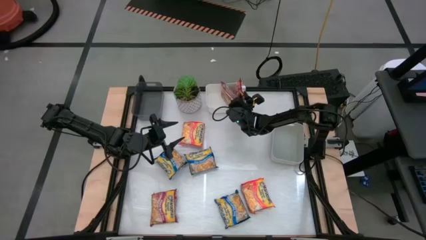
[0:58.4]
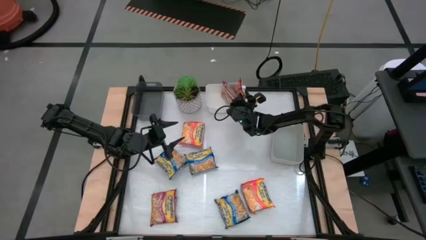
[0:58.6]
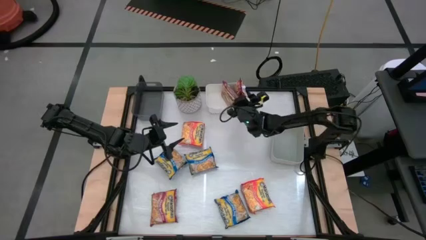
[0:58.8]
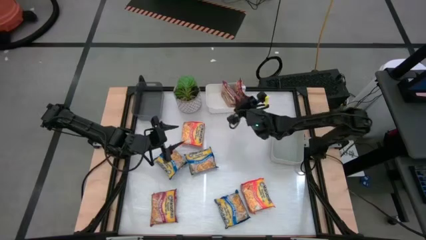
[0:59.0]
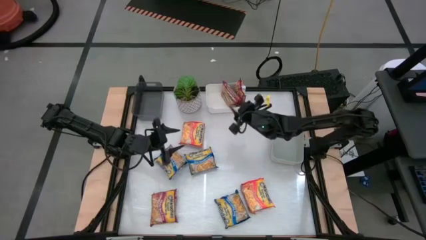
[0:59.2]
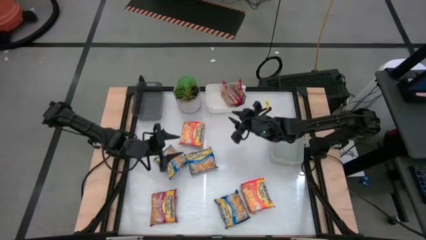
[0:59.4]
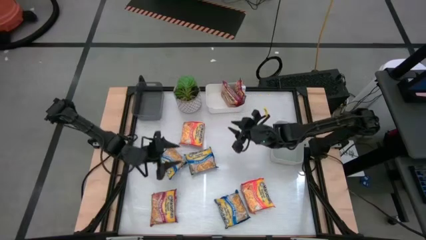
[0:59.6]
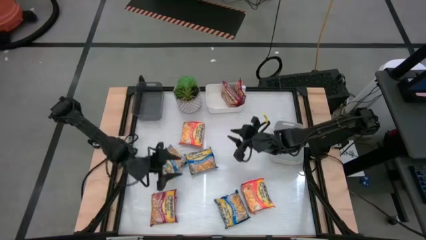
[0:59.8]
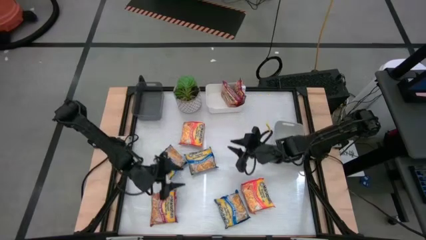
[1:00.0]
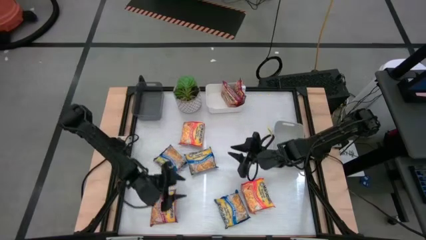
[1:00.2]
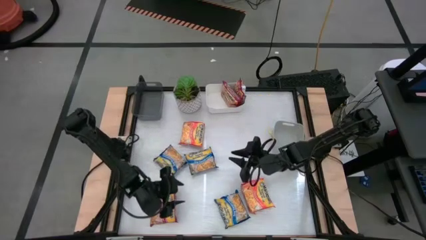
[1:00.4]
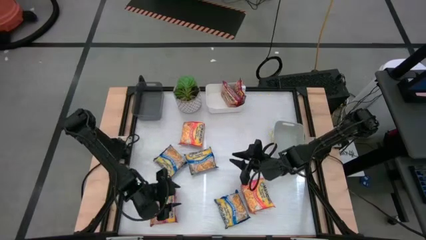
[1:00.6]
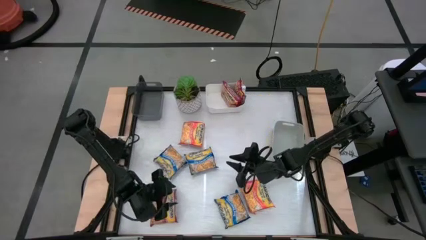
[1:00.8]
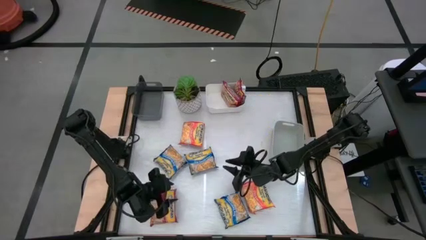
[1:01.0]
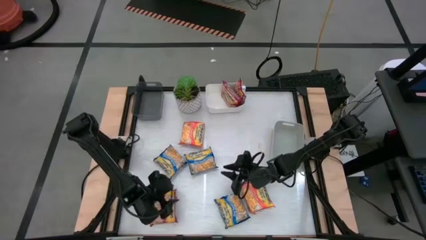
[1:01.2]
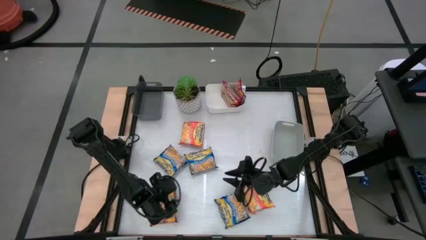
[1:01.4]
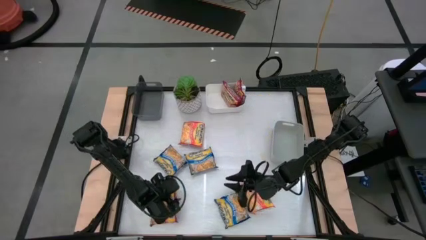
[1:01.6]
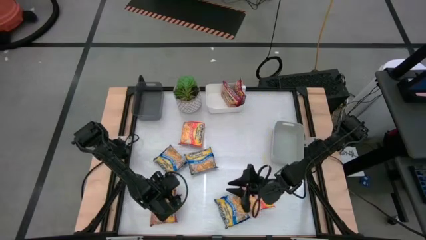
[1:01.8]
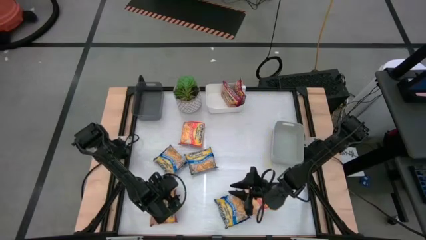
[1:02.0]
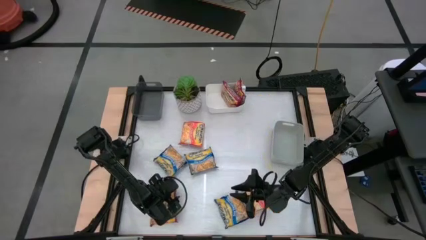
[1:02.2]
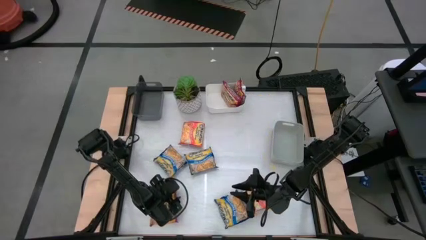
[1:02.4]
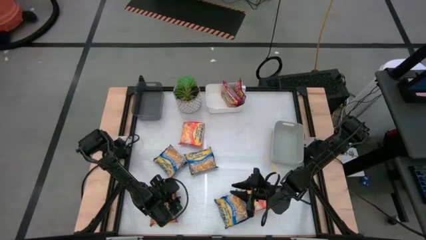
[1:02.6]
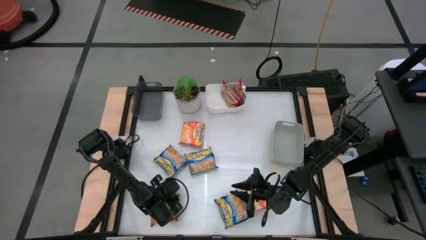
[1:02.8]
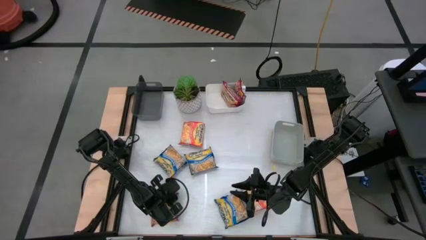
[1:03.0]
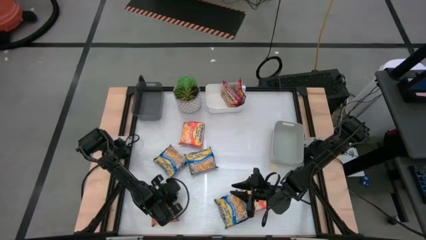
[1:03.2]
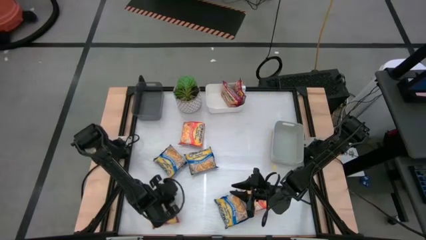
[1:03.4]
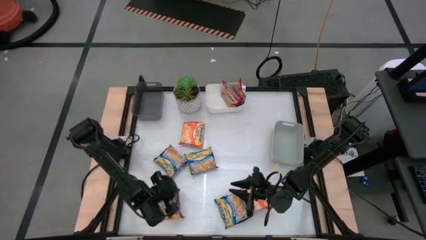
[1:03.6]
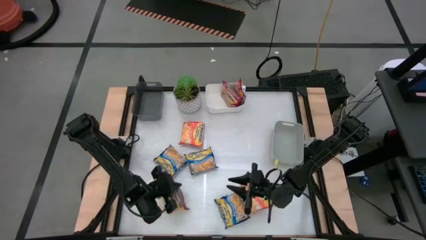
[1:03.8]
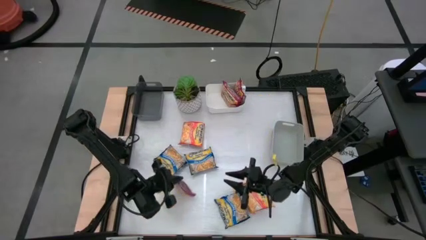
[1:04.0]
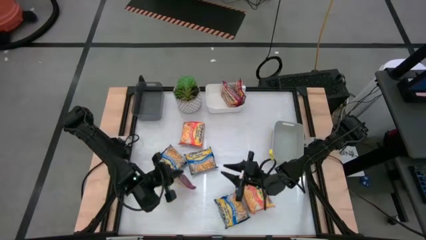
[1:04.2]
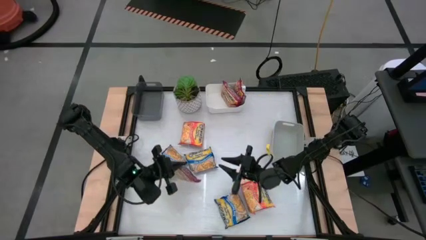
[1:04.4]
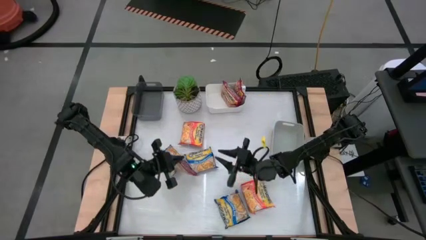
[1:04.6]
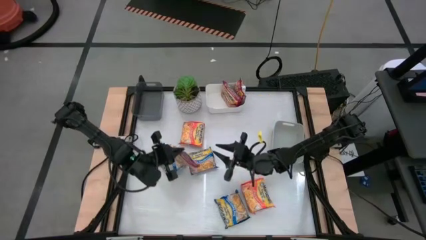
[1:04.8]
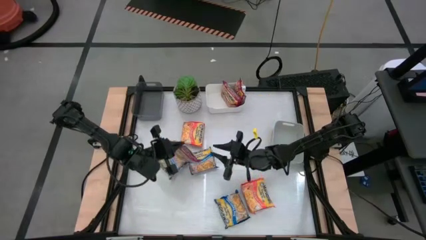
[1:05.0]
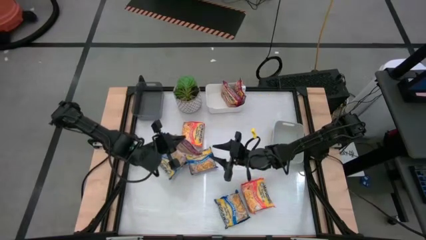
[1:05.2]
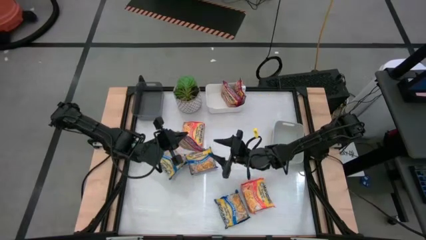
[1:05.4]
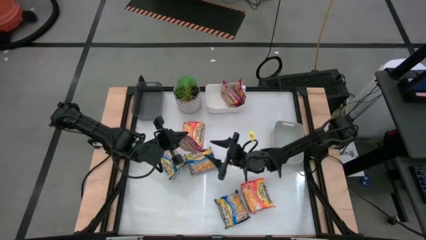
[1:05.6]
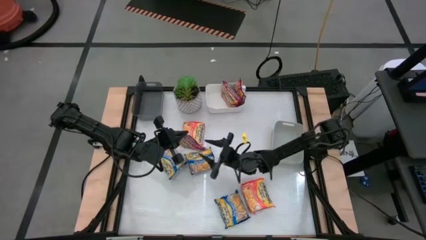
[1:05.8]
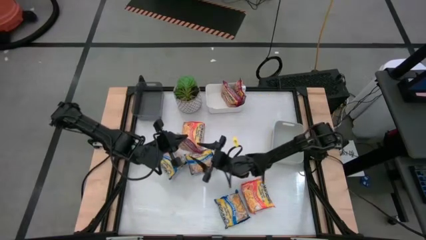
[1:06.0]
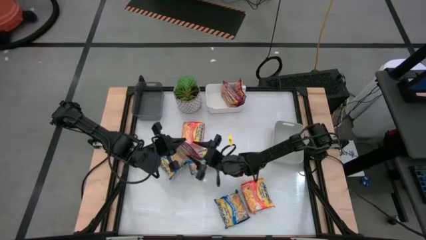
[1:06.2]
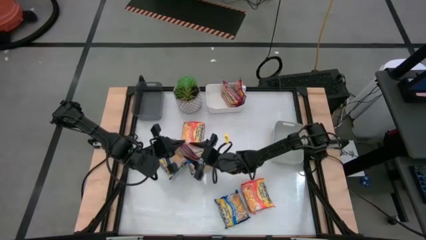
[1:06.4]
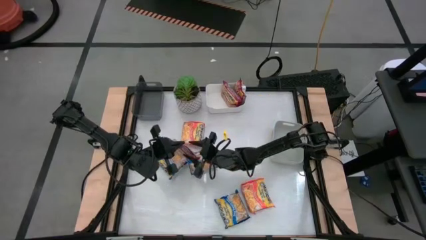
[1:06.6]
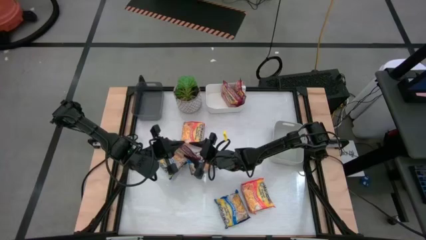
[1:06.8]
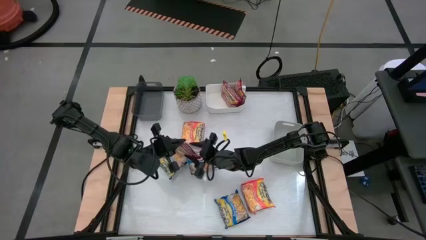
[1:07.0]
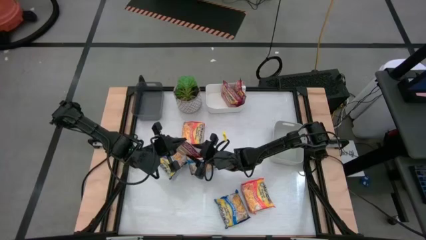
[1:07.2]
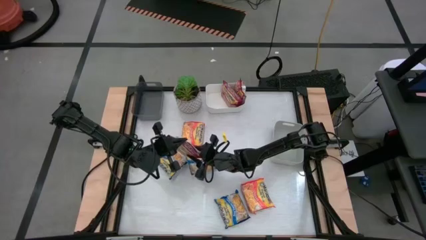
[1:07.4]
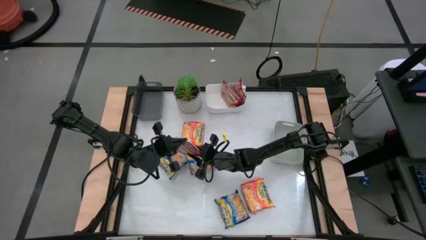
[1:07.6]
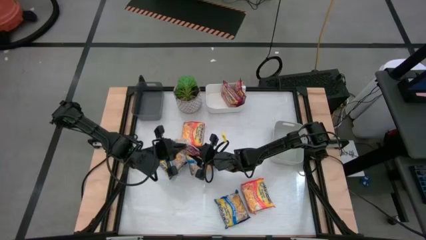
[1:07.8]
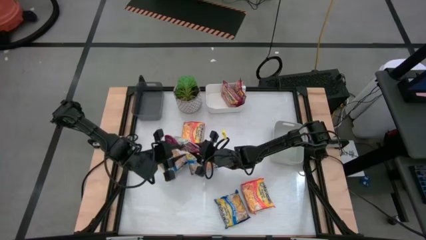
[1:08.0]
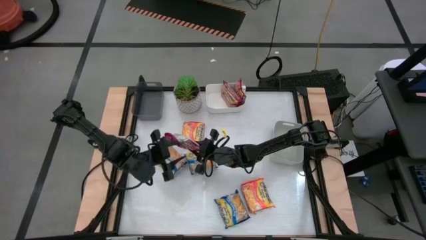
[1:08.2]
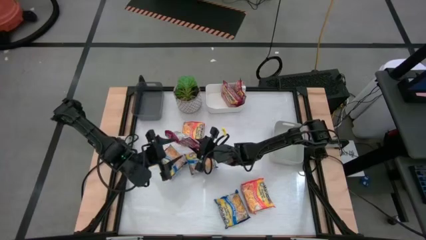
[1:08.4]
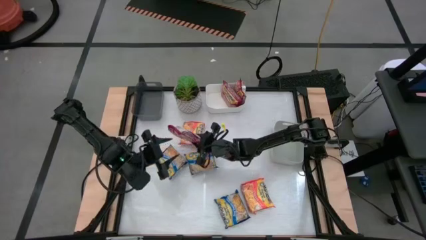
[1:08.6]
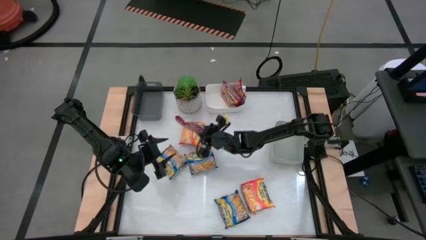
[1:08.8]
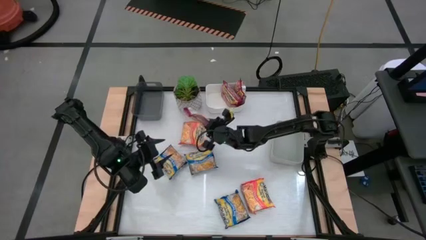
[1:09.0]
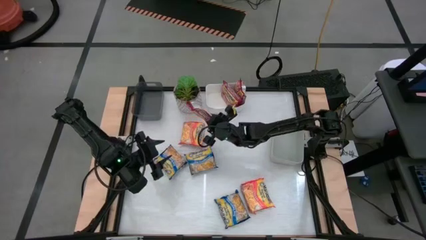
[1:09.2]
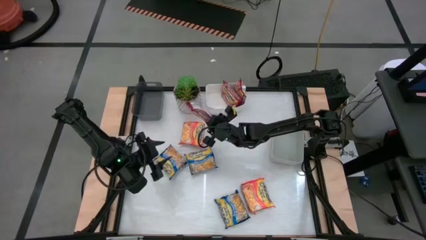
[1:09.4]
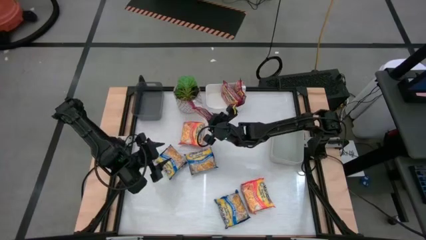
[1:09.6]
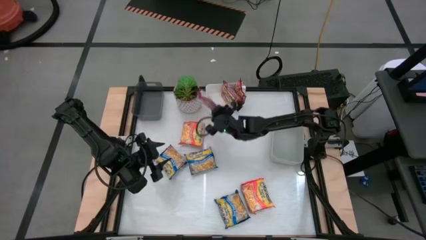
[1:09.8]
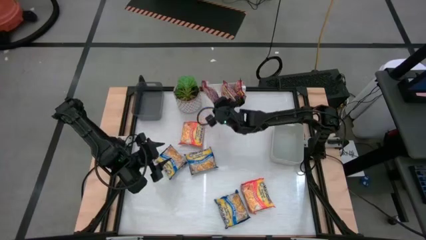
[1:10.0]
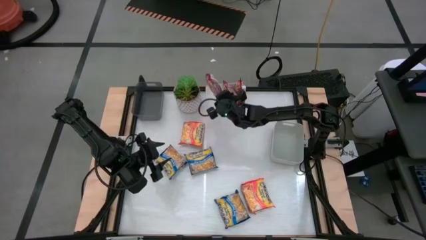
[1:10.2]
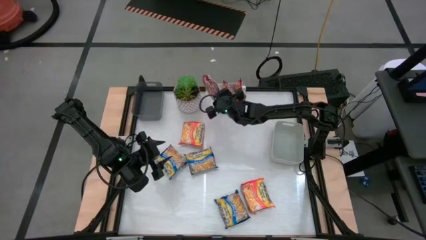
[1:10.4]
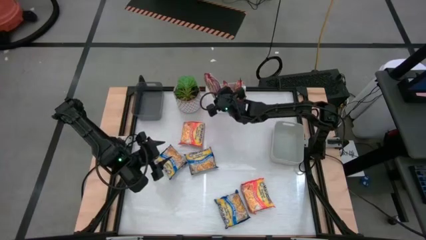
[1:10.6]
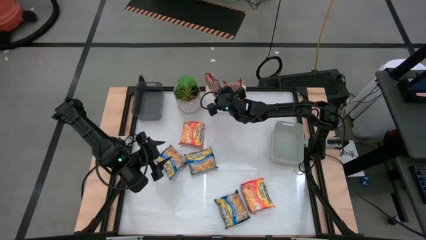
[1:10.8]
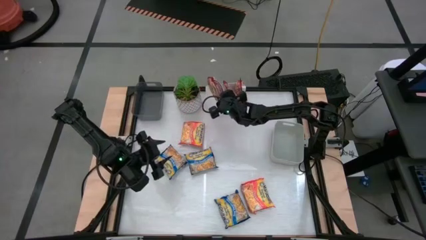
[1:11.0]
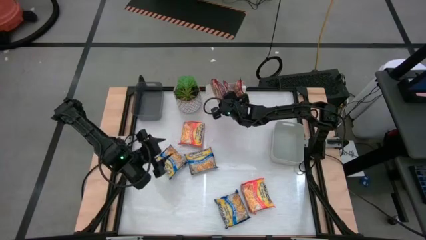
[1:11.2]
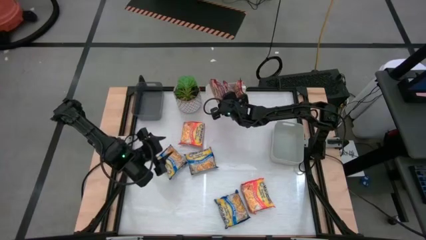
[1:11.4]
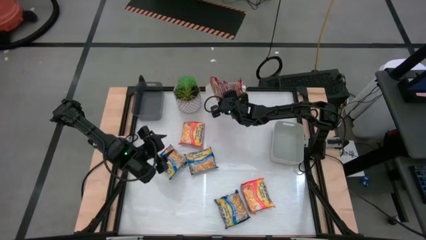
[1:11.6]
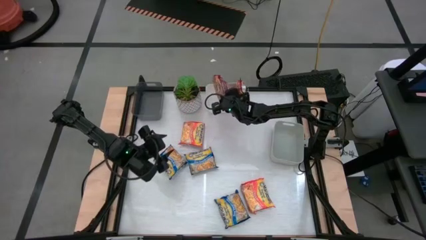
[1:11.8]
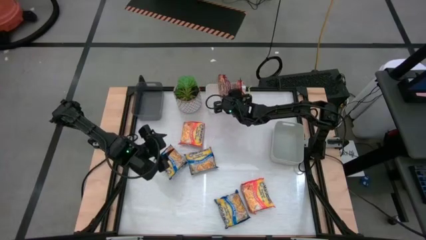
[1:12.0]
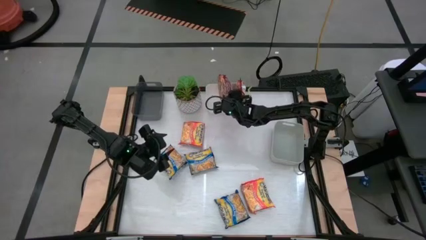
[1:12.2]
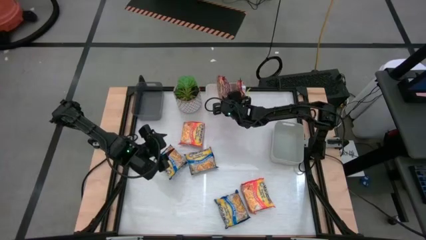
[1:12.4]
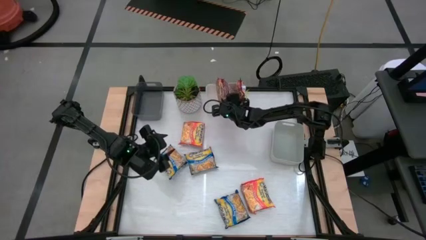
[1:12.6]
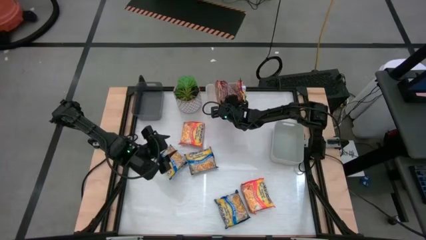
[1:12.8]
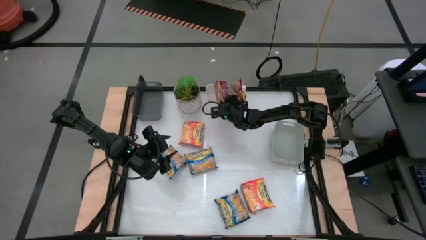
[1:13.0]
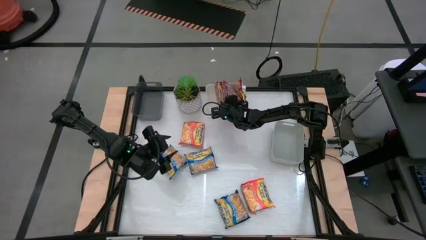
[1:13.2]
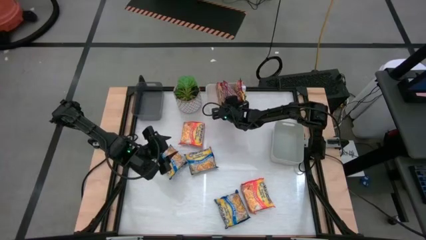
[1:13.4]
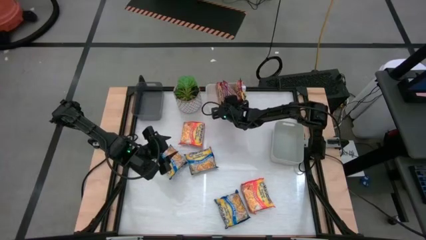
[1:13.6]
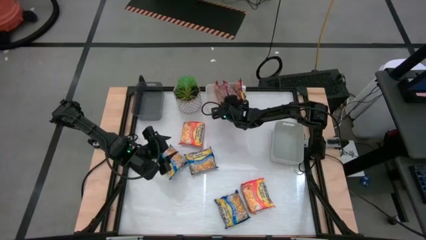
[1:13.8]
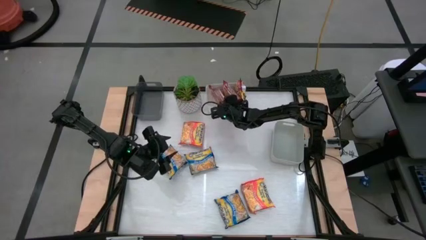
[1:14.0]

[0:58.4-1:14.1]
Task: Sort Maruchan noodles
Put the red noodle pack into the white bin
